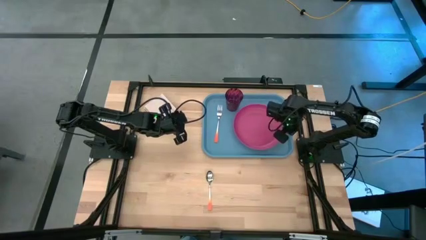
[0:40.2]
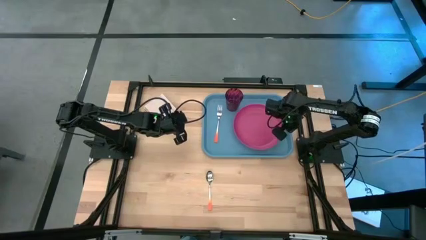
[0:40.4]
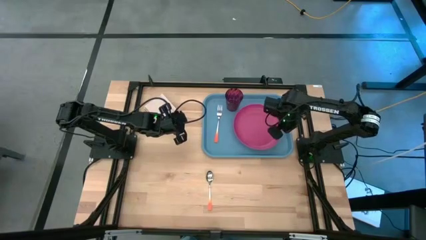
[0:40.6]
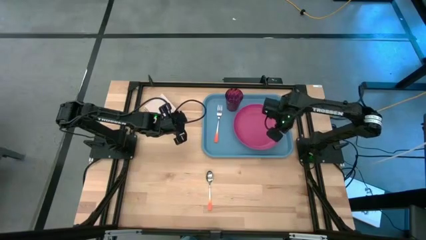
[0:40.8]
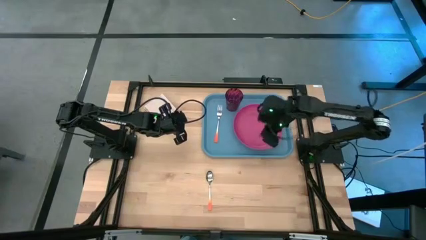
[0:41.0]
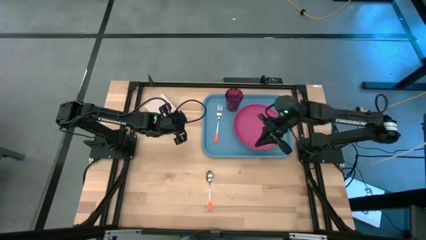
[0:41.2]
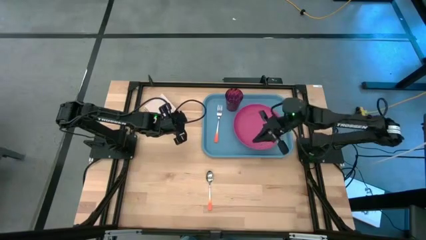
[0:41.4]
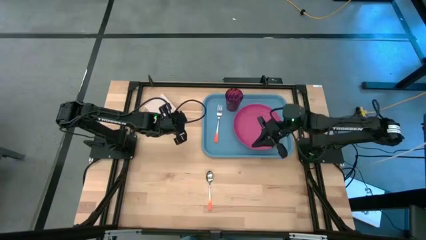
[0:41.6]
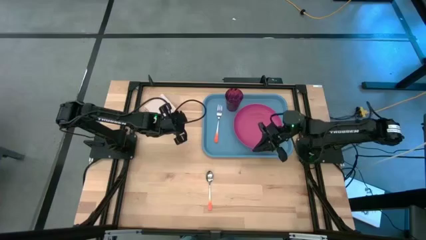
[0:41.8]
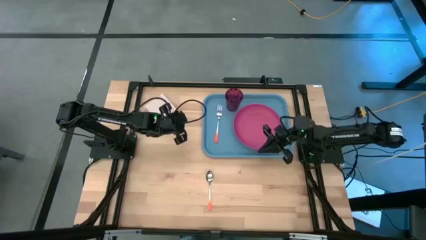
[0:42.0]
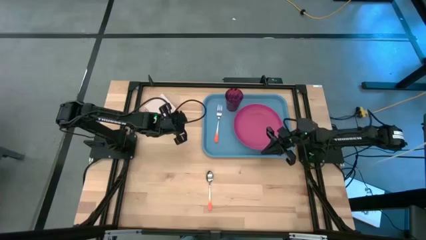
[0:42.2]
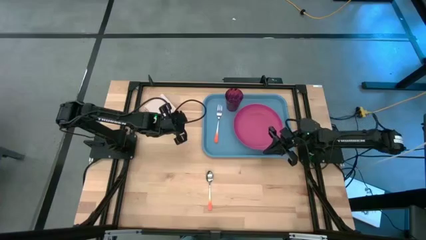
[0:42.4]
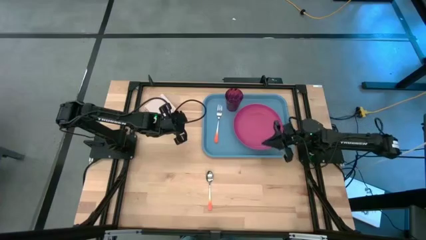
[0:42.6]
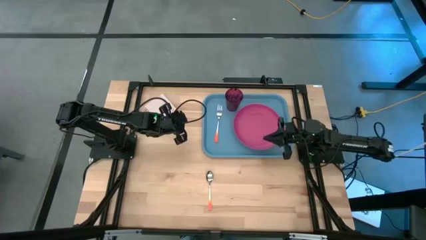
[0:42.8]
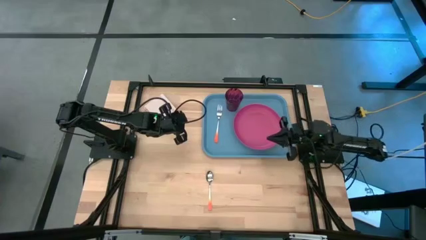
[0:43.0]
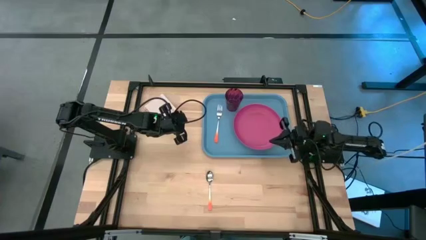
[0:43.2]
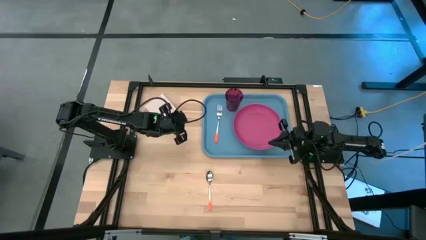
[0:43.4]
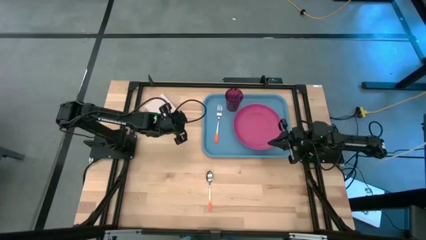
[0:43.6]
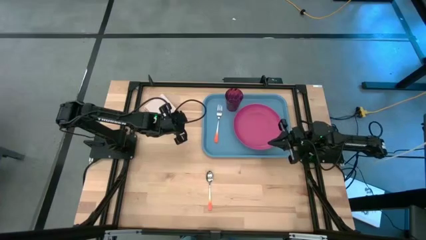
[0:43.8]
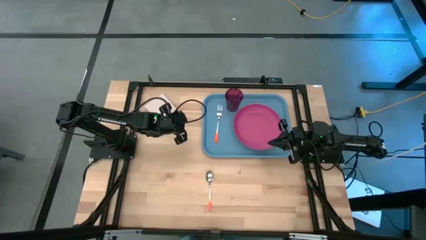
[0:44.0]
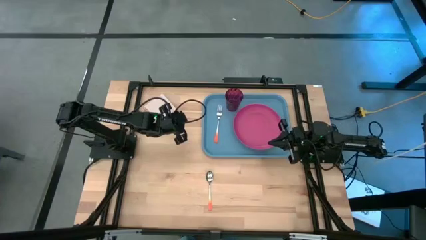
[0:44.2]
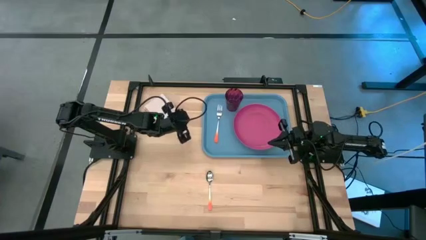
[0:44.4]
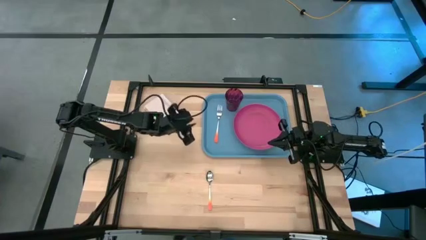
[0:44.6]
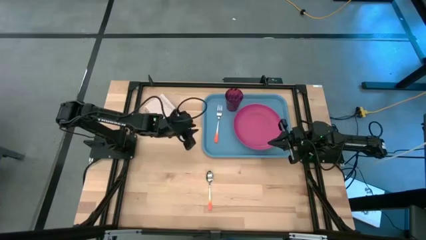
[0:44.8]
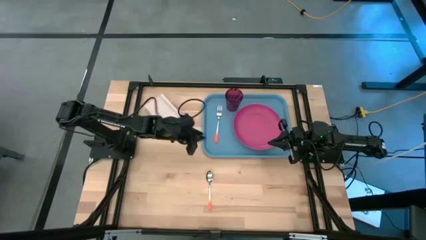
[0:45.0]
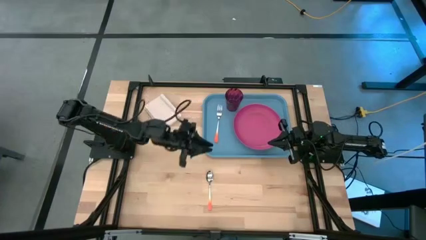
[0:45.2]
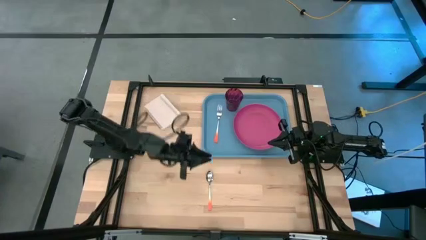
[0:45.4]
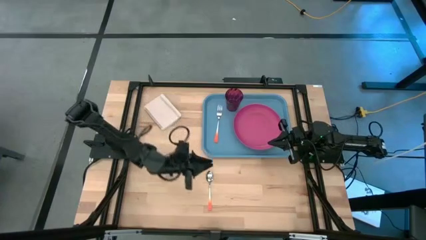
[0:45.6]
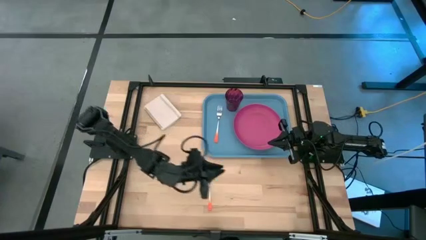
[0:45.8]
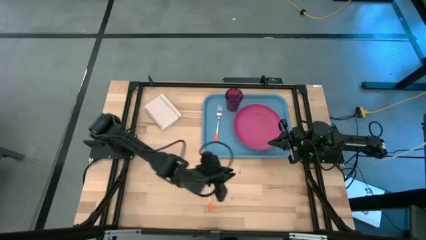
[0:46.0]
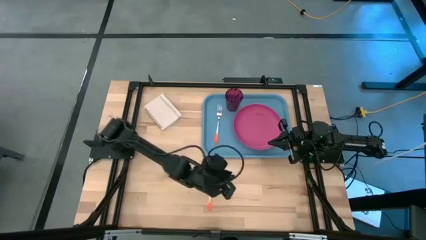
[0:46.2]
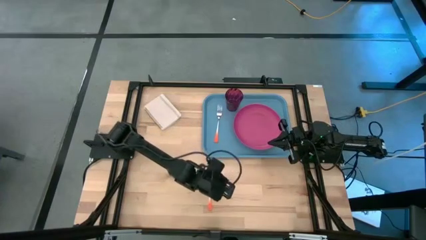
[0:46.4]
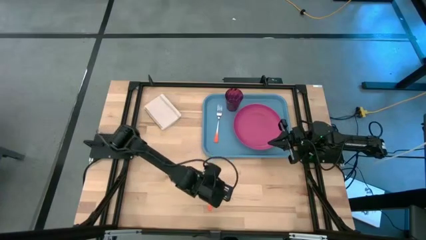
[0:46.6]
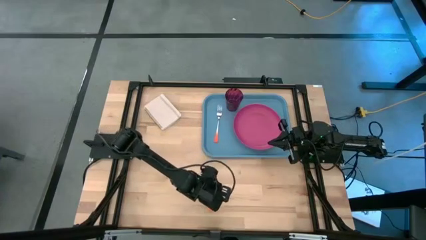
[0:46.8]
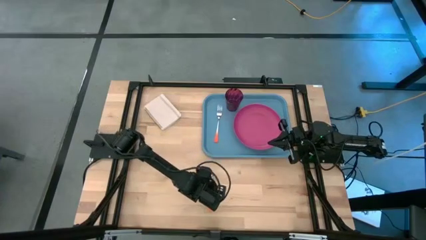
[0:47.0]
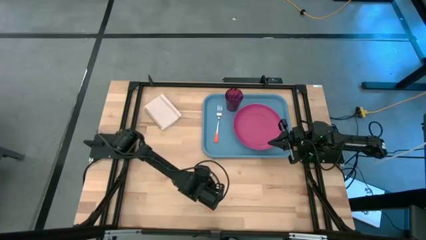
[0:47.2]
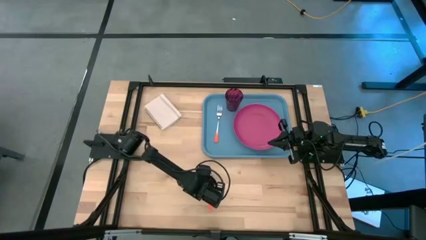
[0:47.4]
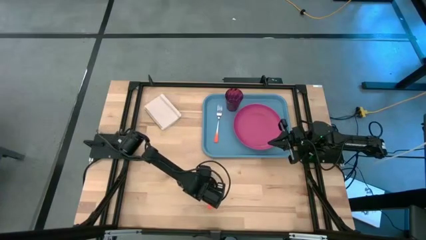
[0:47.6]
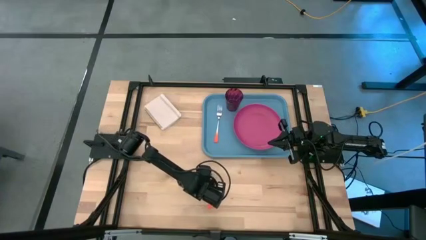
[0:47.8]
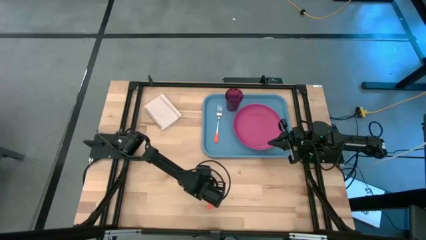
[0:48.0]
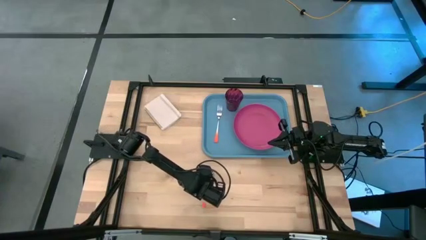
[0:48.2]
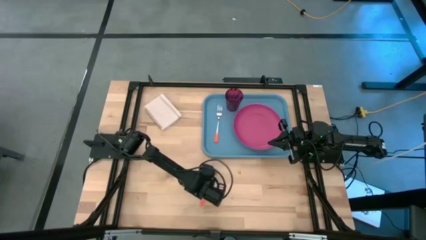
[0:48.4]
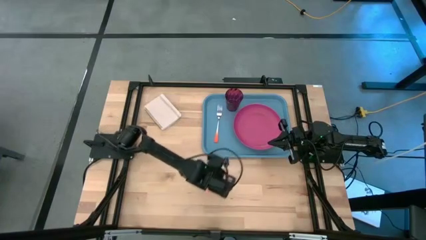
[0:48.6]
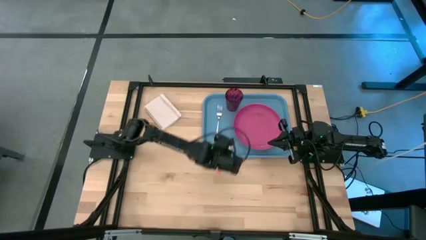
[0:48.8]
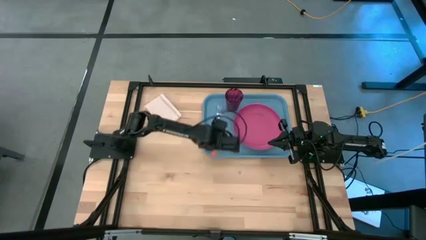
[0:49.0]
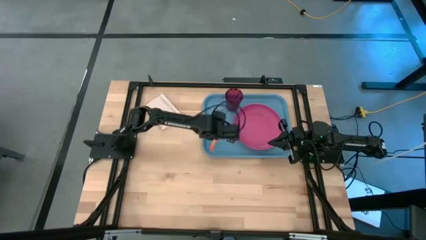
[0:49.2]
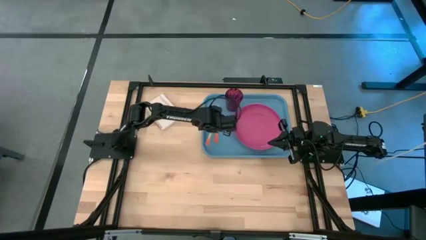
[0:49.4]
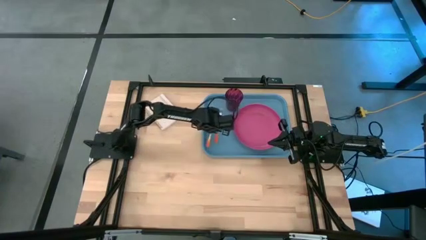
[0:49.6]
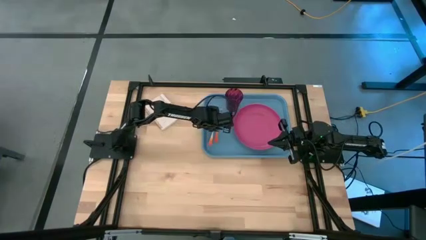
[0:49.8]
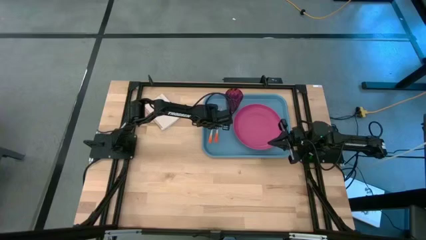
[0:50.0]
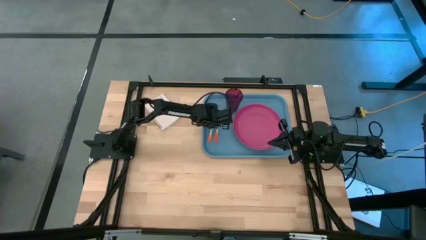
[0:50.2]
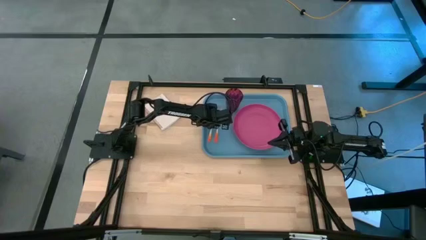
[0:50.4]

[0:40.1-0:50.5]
Task: Pick and place plate/cup/fork/spoon on tray
Put the orange spoon on the blue tray to the left side of the orange fork

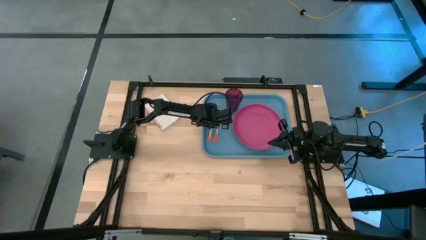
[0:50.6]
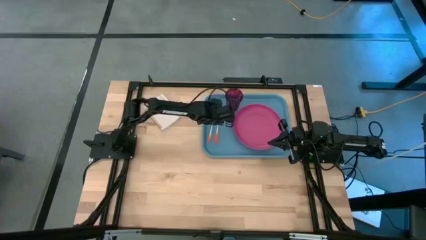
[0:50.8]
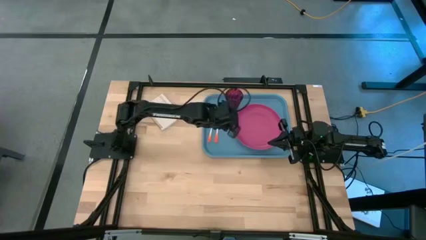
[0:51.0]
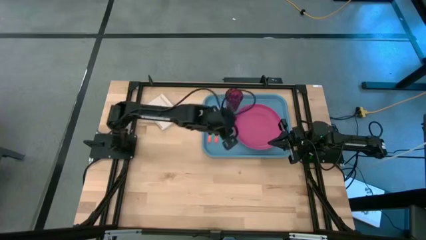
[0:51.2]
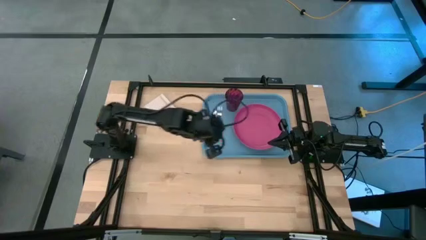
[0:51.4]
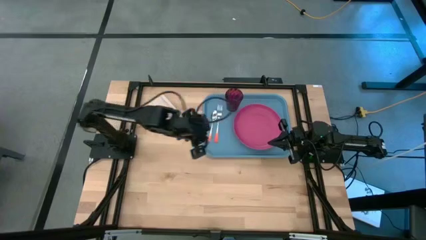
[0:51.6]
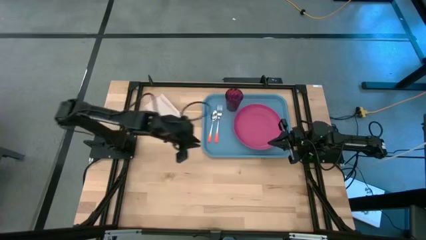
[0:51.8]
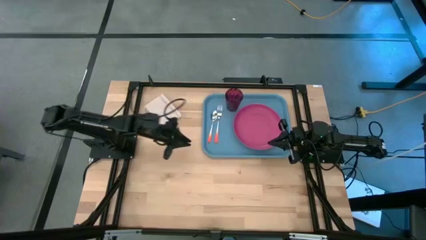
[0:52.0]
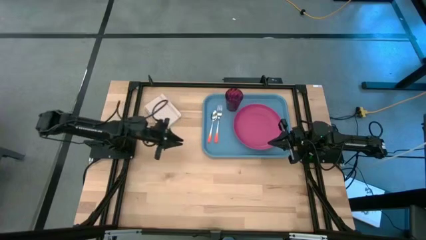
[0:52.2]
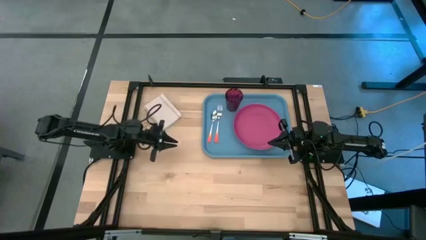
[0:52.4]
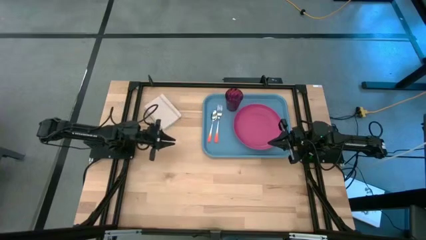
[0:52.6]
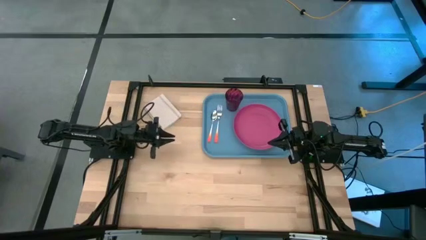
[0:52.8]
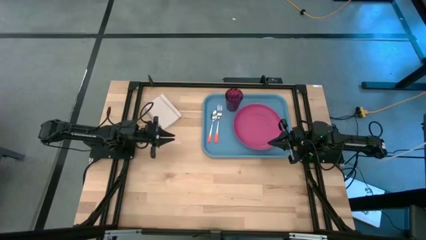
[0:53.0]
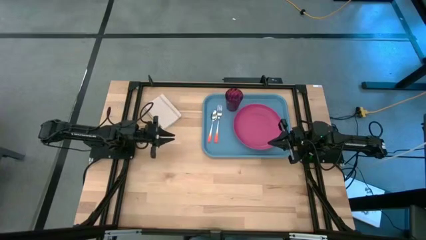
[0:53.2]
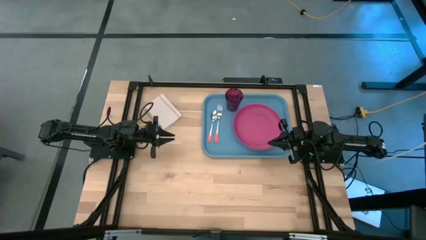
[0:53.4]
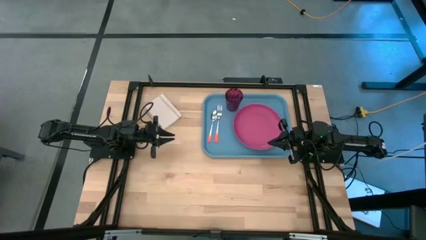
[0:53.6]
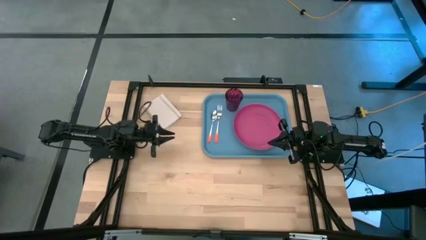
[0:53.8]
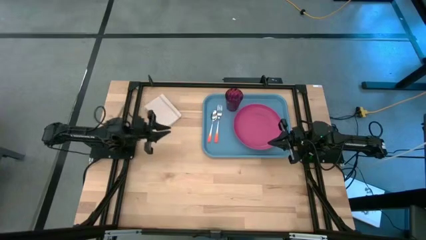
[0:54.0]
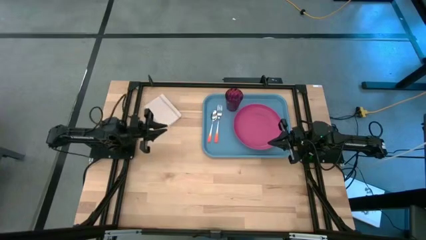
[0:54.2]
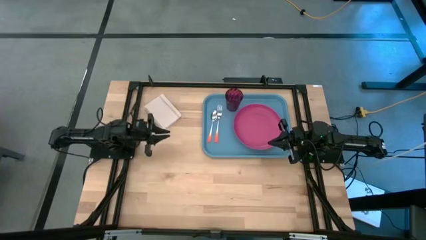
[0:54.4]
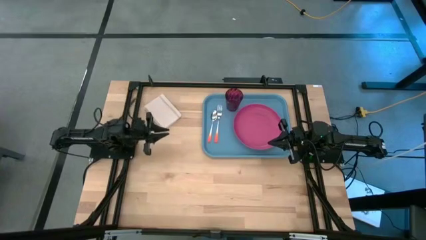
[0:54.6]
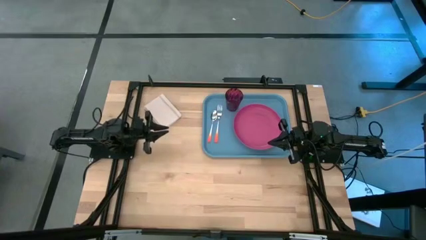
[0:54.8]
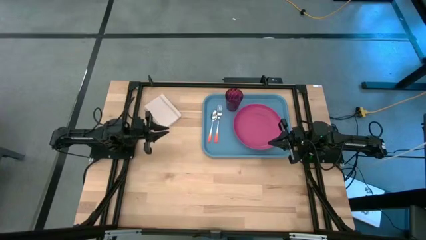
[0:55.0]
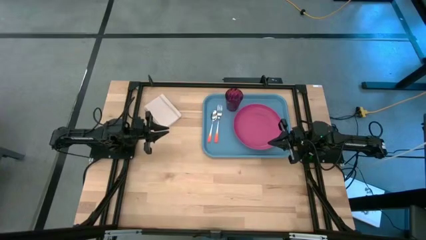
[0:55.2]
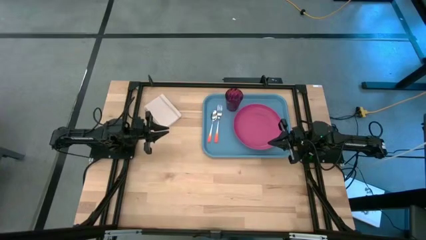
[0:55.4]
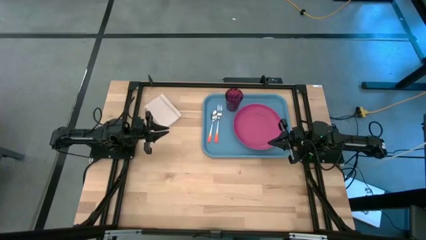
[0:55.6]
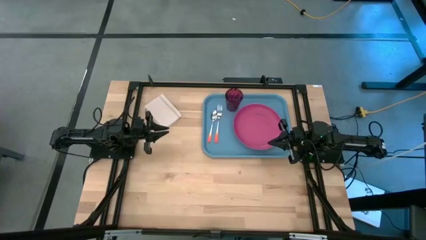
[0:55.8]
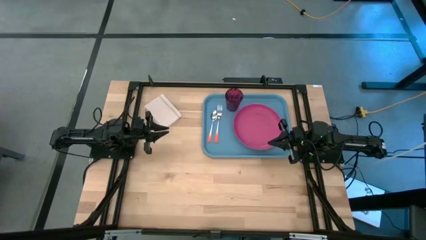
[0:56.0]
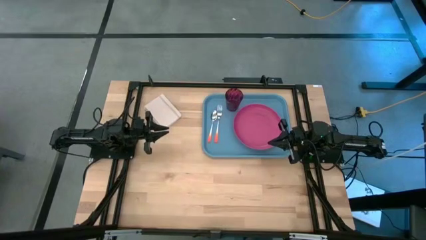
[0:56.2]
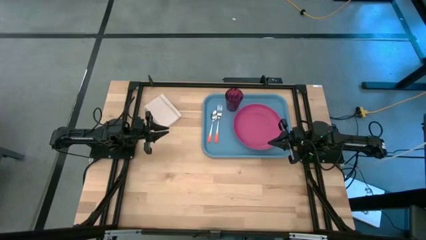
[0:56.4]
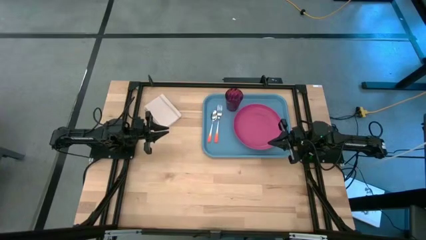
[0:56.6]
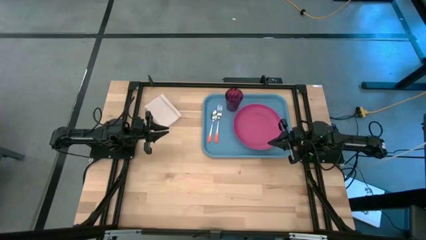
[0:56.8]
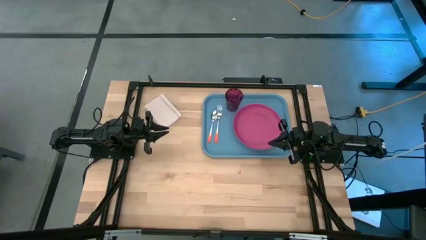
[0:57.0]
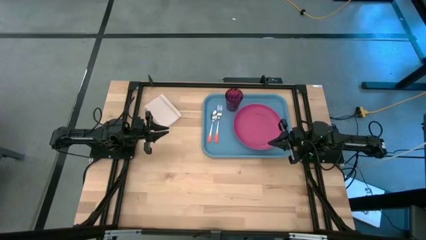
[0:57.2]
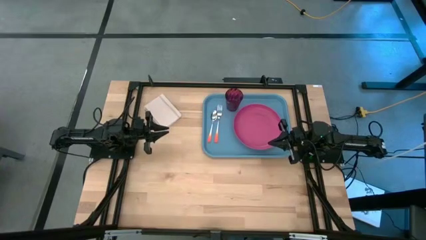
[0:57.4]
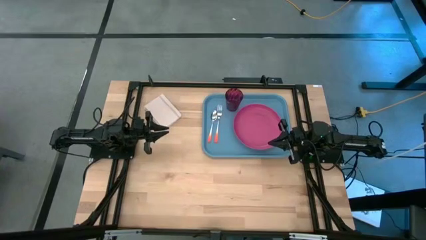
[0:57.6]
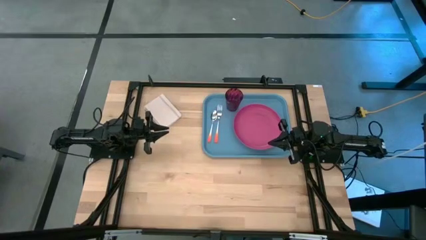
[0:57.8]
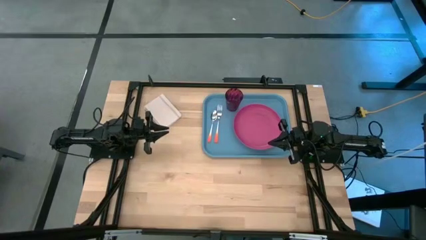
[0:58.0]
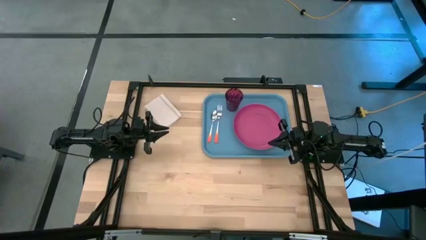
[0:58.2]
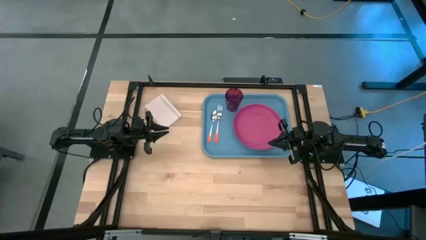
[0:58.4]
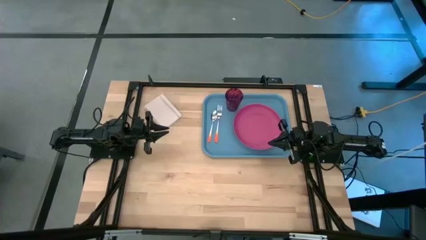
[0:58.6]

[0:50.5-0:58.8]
Return to Home Position
